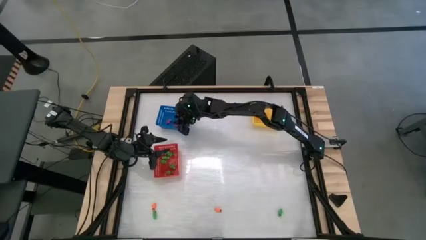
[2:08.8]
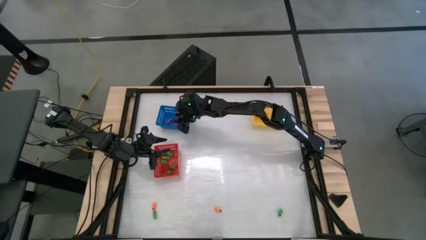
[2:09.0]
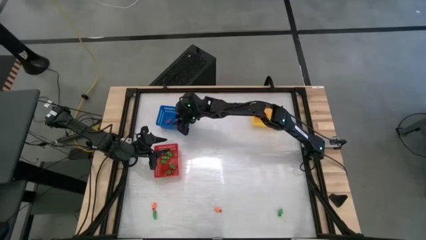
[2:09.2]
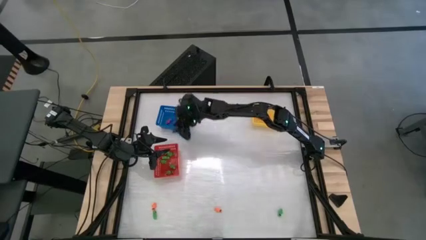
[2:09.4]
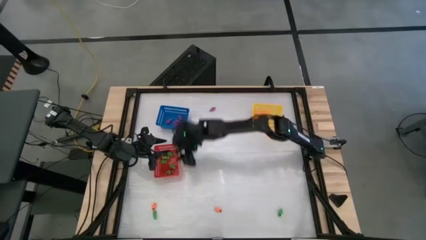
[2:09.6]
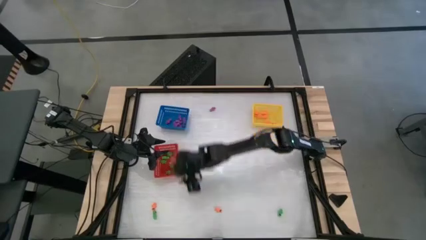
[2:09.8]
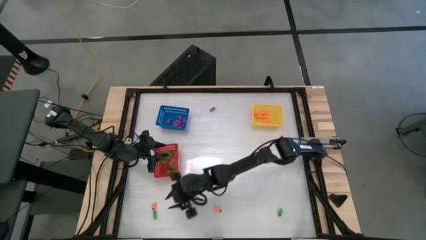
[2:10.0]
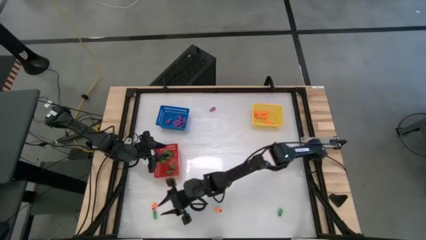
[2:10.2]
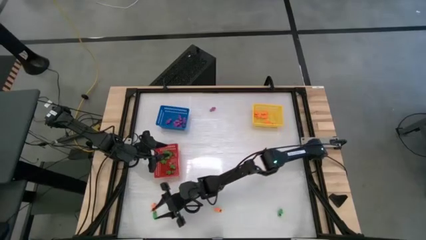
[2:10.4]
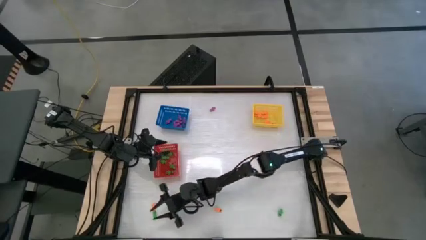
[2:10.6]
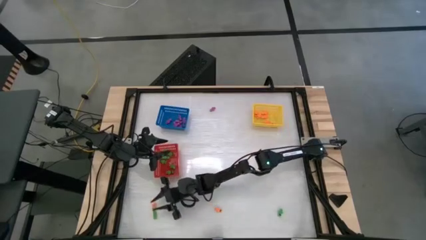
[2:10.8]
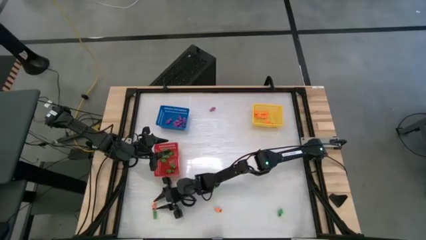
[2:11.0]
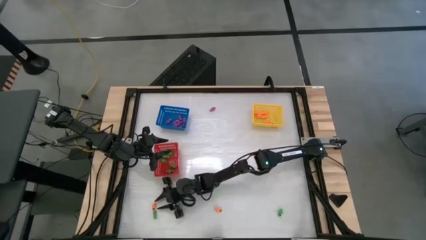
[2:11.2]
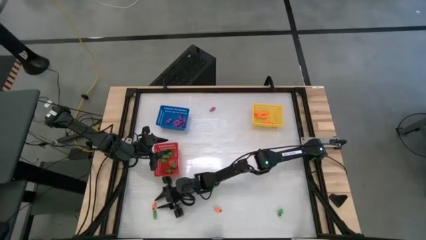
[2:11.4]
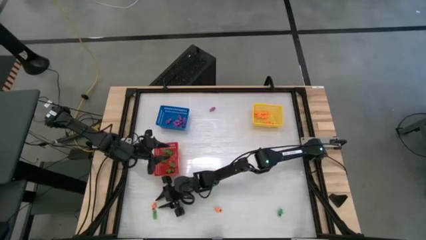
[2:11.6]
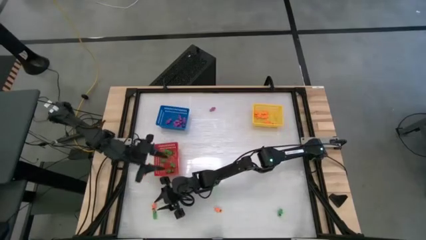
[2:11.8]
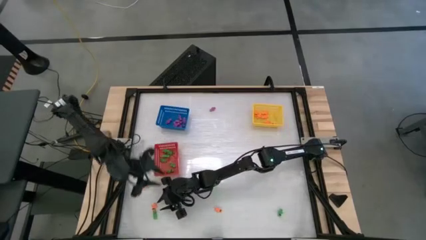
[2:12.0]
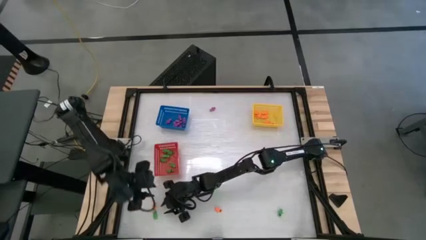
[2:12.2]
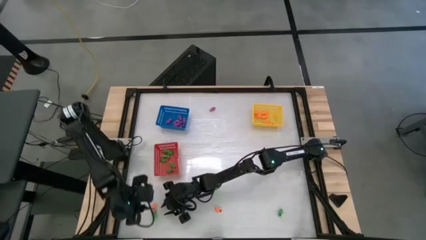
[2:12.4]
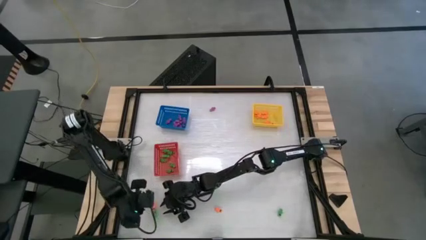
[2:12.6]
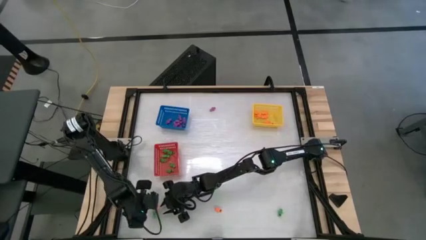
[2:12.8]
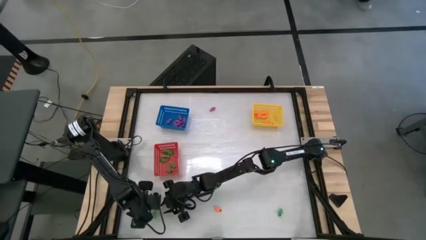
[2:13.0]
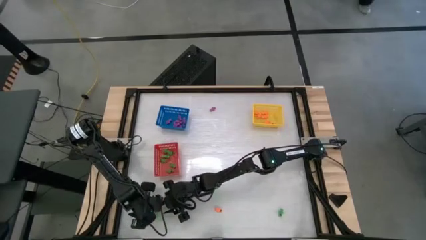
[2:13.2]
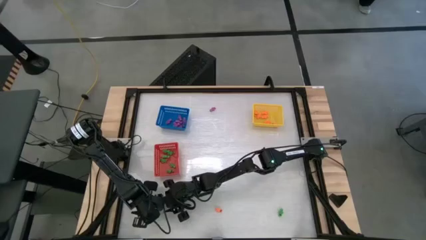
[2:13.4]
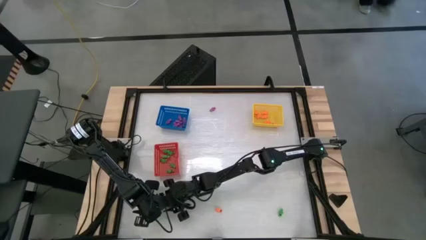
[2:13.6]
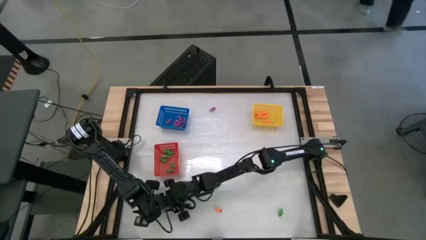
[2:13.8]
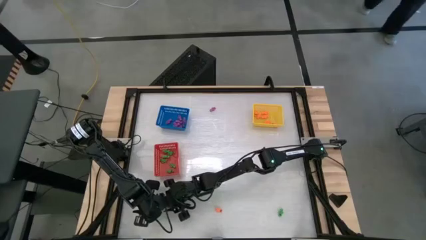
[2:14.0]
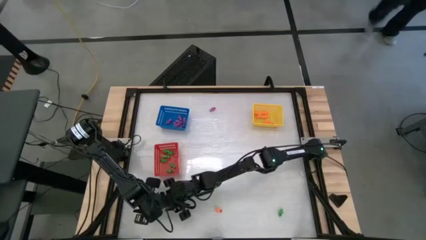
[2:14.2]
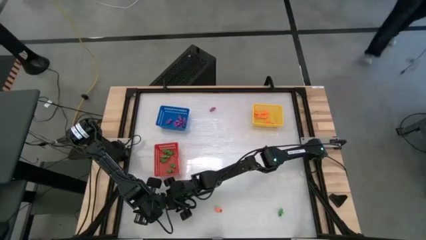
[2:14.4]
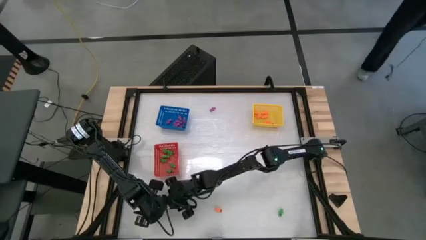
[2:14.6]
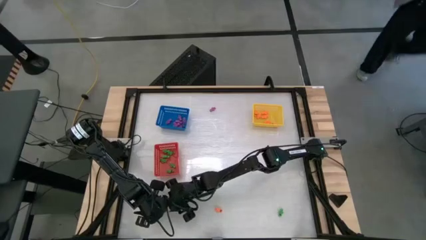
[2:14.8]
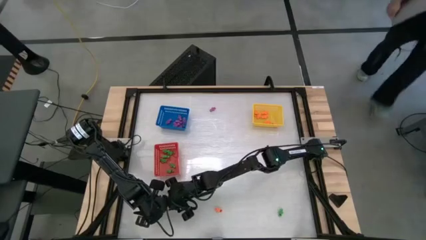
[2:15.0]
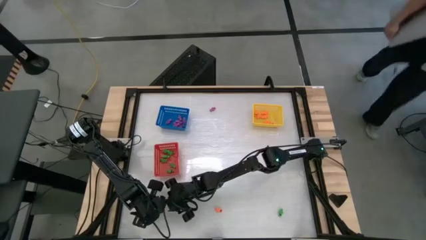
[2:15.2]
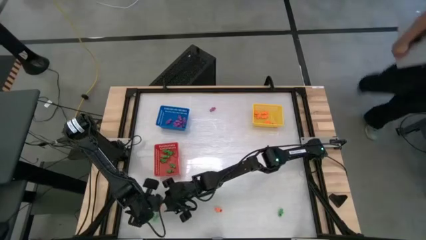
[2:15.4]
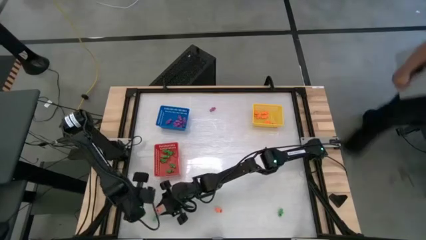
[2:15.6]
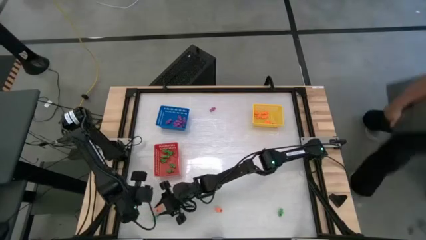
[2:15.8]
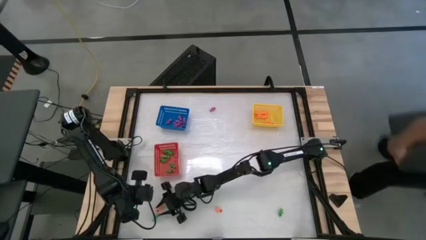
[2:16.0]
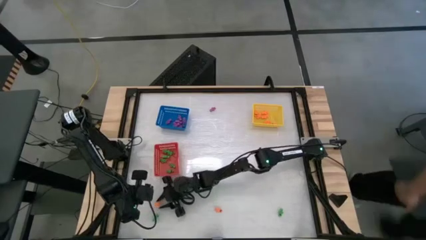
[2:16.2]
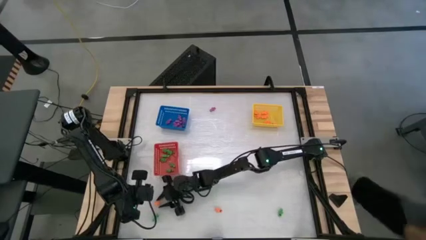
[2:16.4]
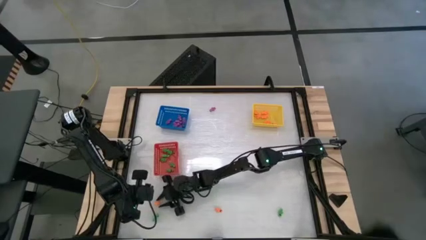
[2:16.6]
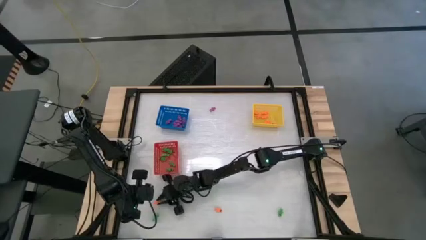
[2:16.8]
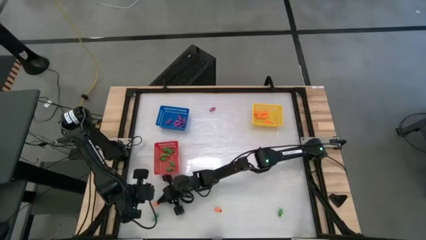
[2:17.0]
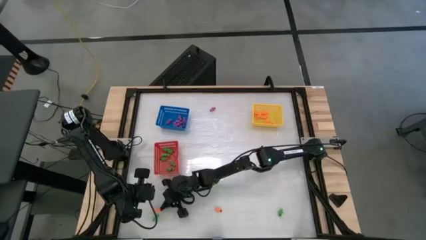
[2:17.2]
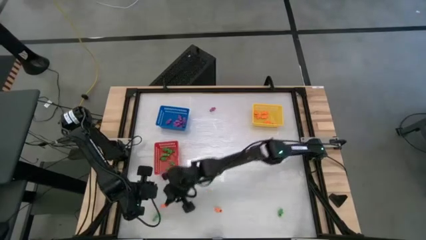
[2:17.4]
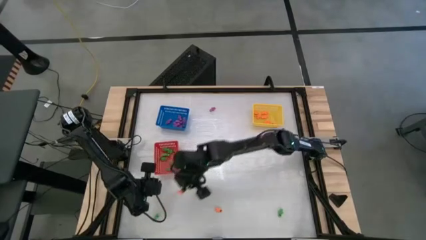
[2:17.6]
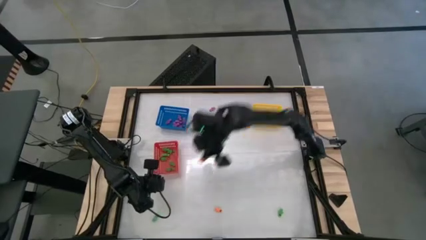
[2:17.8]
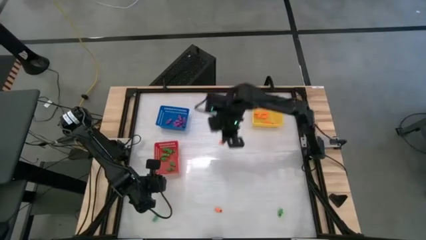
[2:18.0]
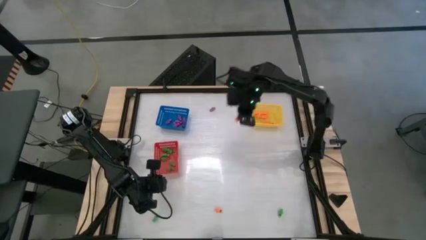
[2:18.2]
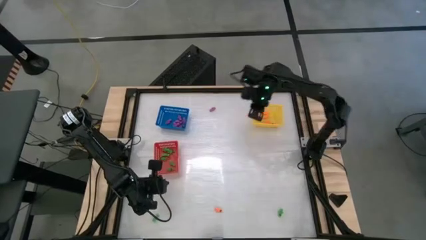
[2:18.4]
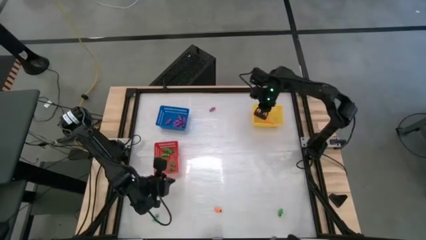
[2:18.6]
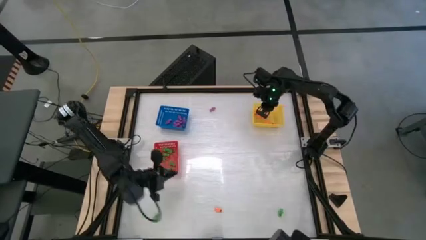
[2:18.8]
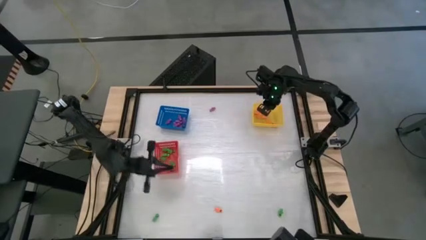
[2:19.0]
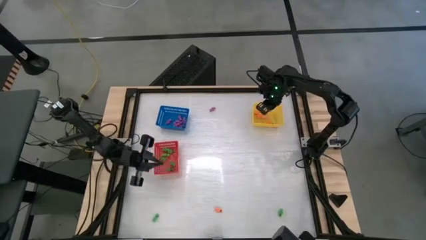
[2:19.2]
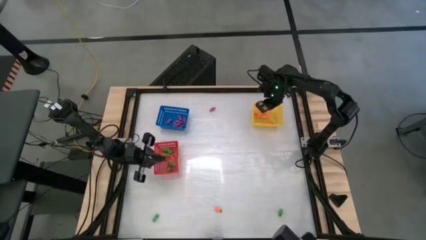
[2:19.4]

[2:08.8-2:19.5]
Task: Sort Halloween decoration
Put the orange skeleton toy into the yellow bin

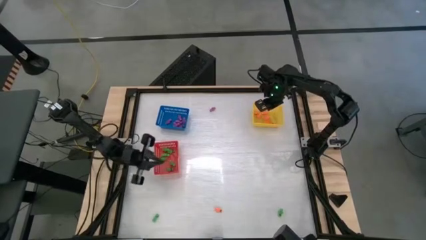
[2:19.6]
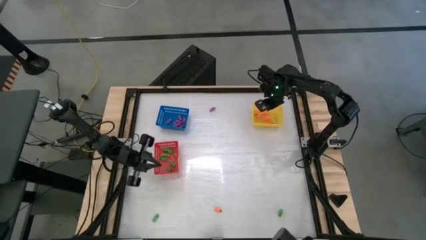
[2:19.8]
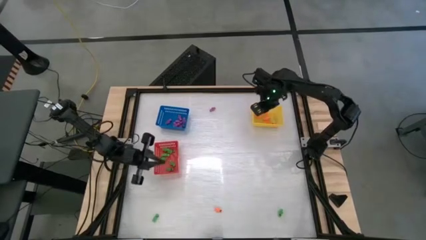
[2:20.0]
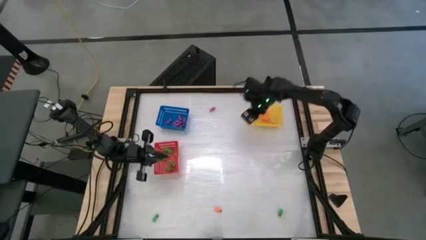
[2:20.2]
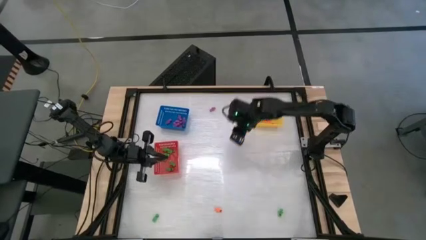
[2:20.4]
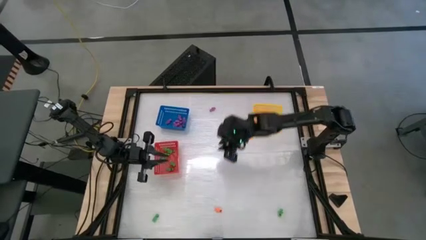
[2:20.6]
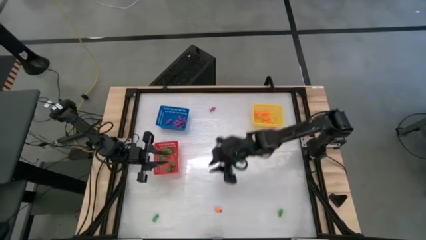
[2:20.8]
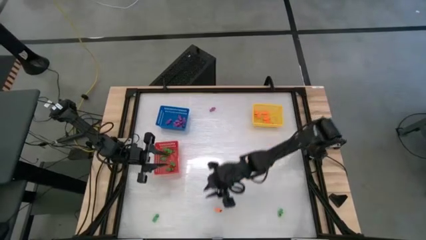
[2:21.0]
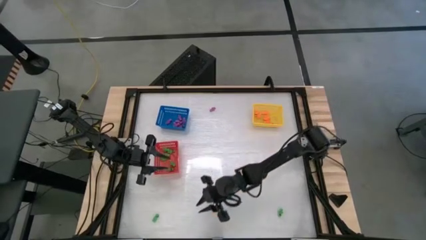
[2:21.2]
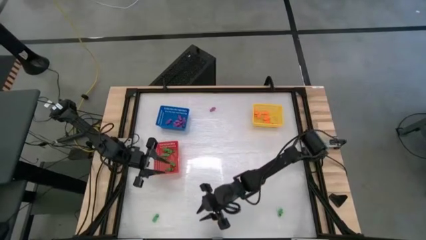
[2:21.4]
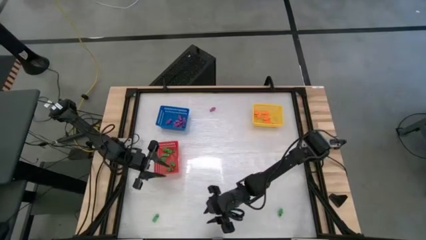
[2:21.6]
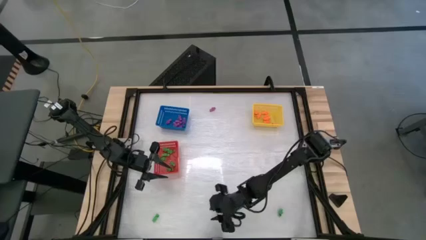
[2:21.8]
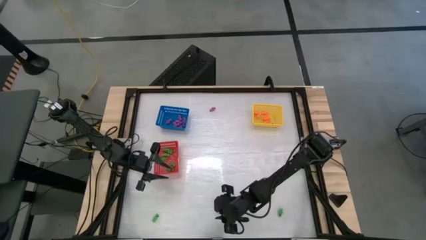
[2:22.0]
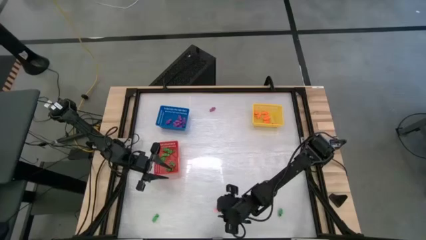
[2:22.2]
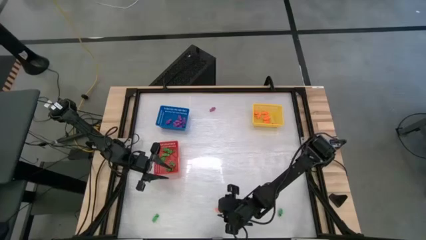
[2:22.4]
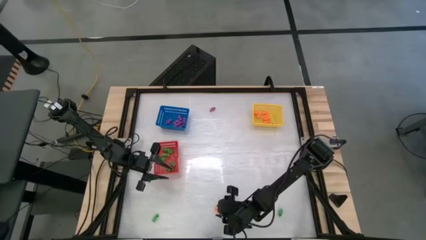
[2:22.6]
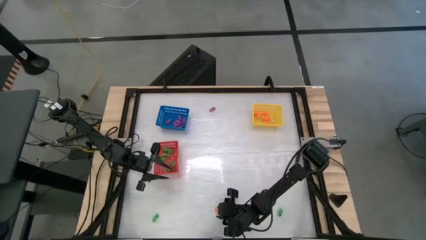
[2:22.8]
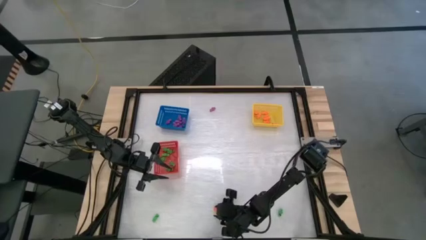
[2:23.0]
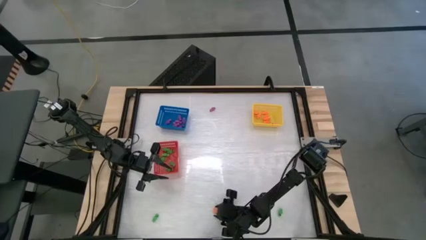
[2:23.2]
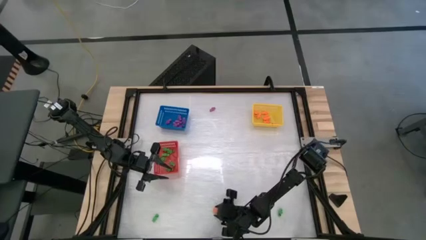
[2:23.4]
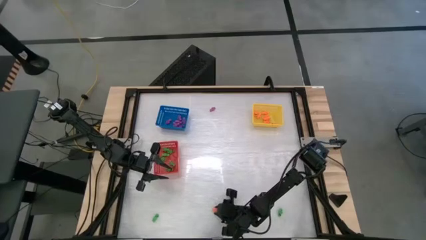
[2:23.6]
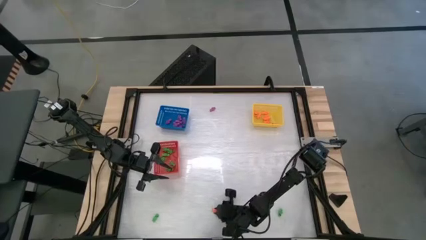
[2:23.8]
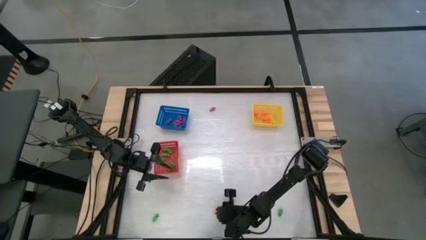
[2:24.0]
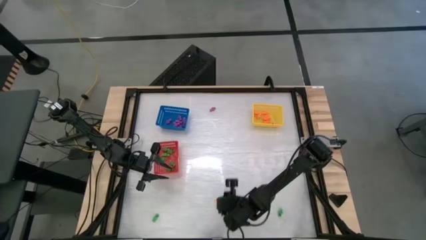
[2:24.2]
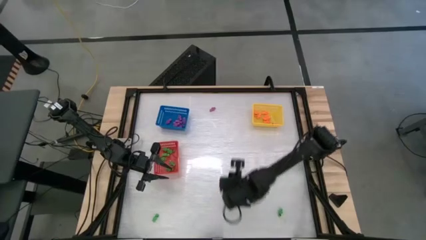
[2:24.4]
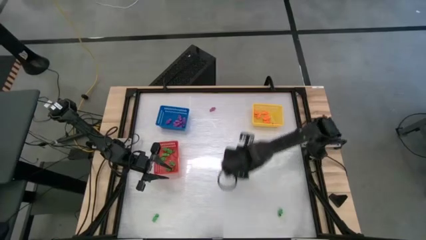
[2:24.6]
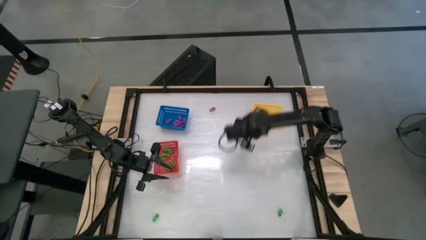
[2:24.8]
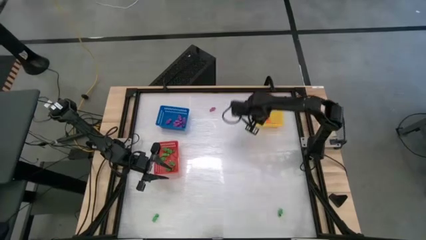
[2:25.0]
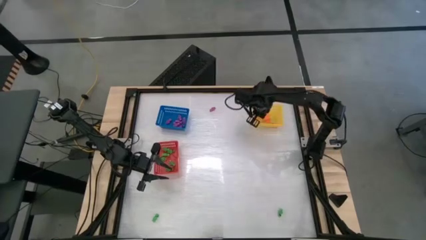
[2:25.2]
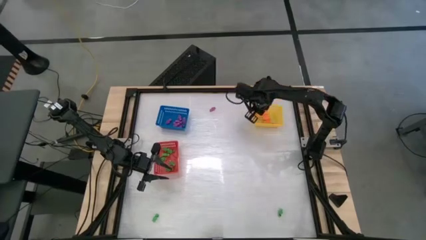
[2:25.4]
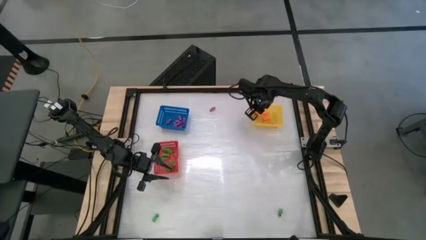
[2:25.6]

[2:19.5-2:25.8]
Put the orange skeleton toy into the yellow bin
